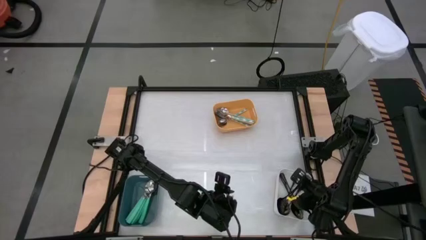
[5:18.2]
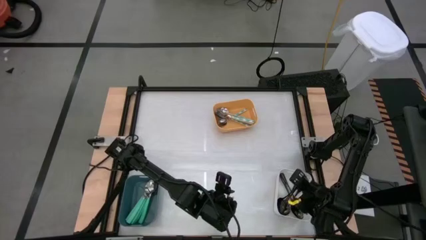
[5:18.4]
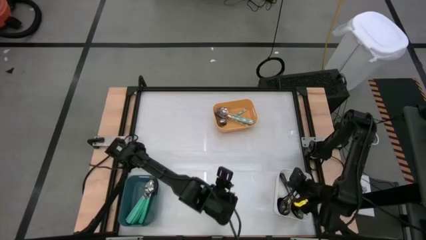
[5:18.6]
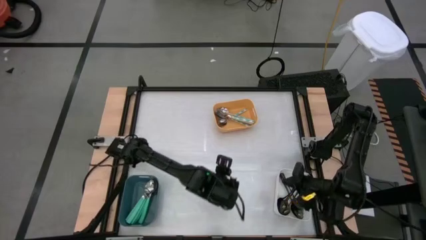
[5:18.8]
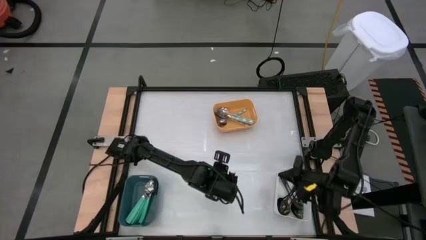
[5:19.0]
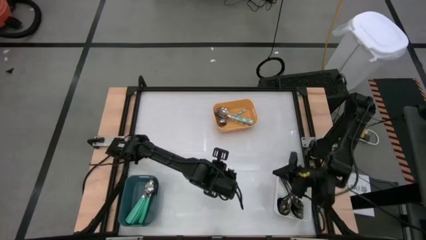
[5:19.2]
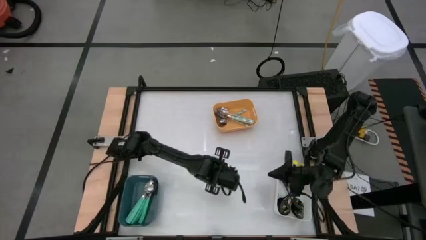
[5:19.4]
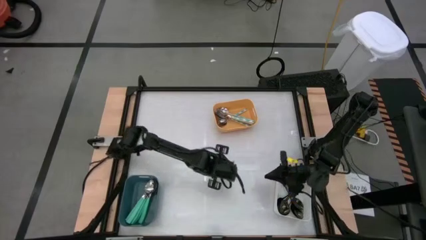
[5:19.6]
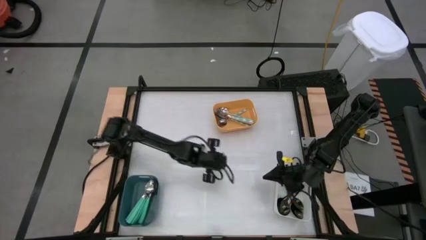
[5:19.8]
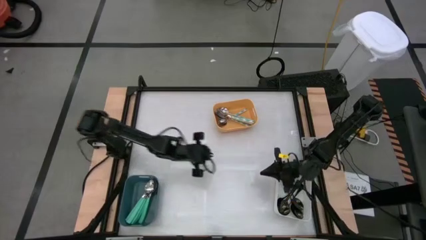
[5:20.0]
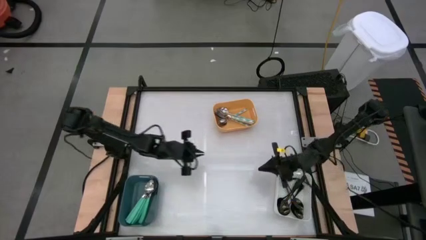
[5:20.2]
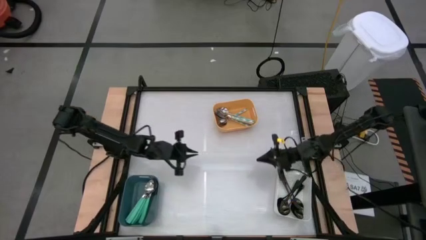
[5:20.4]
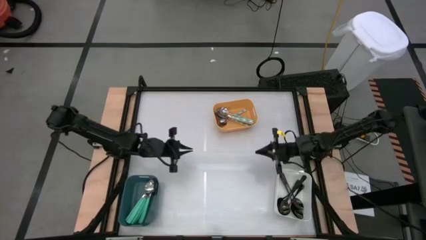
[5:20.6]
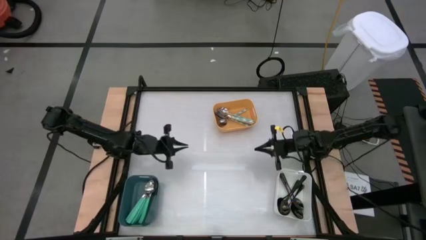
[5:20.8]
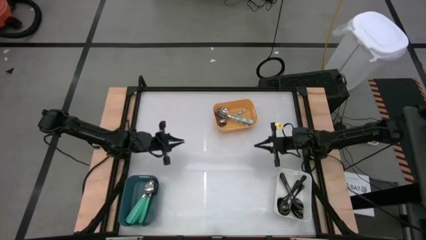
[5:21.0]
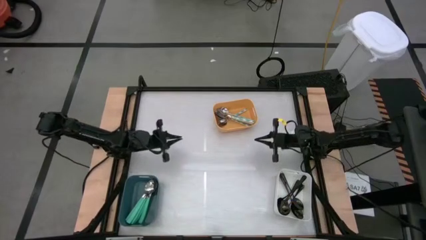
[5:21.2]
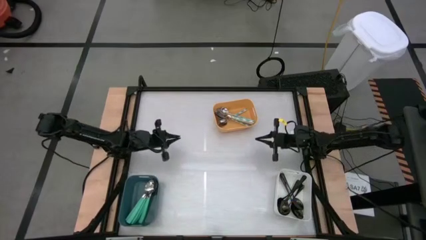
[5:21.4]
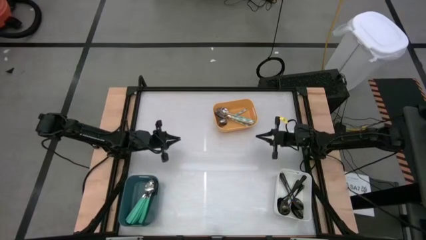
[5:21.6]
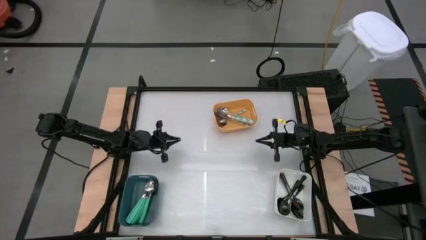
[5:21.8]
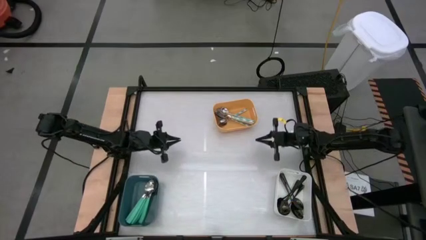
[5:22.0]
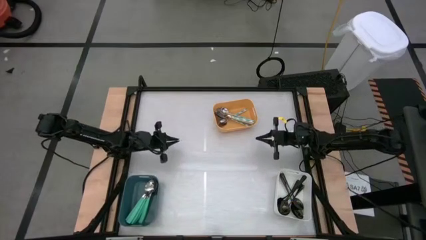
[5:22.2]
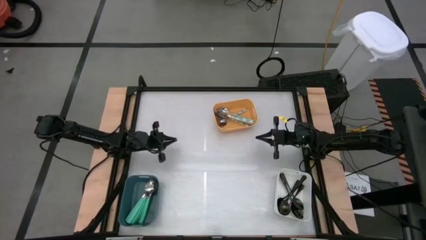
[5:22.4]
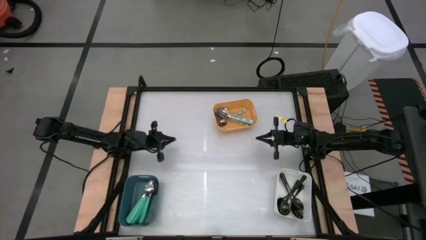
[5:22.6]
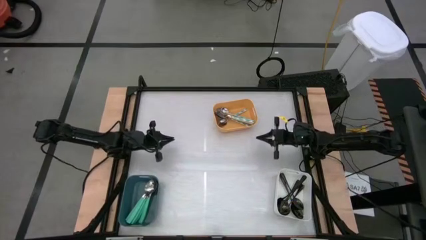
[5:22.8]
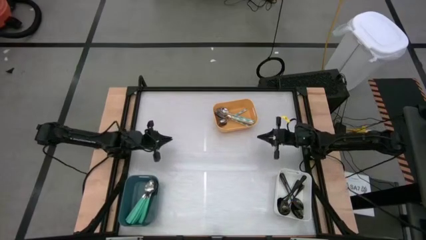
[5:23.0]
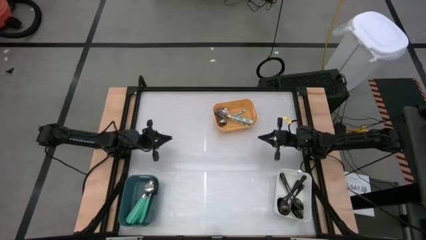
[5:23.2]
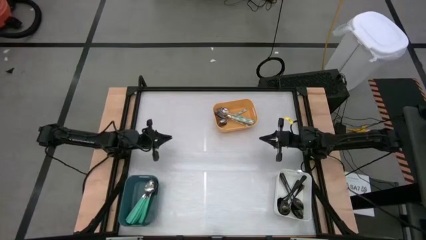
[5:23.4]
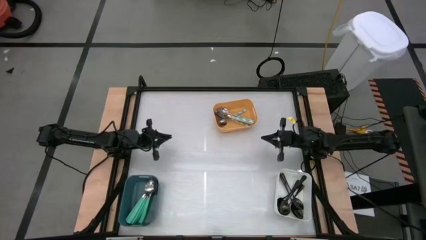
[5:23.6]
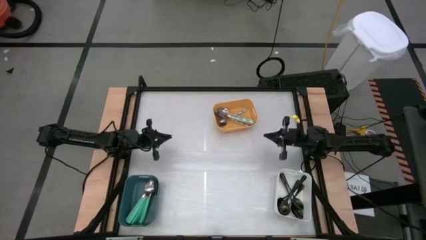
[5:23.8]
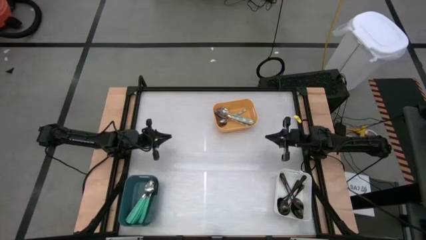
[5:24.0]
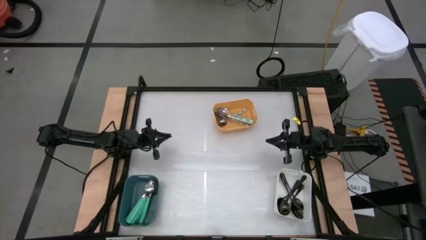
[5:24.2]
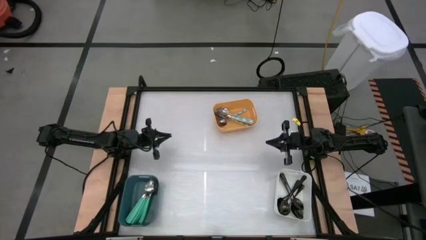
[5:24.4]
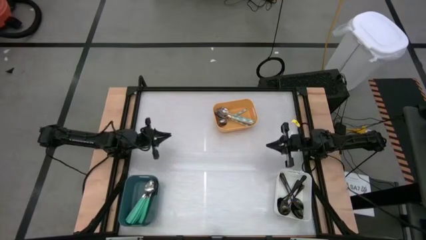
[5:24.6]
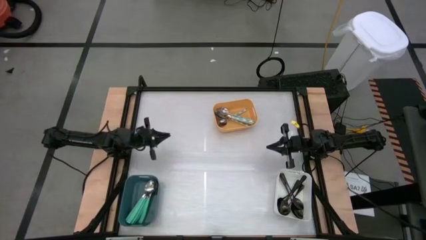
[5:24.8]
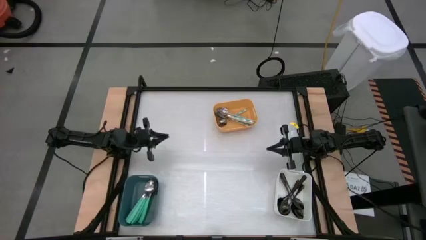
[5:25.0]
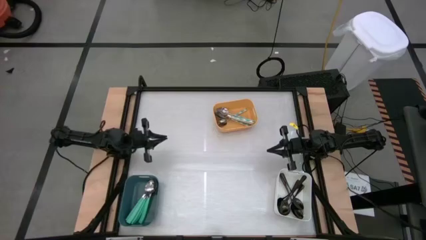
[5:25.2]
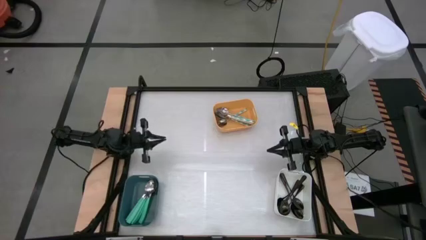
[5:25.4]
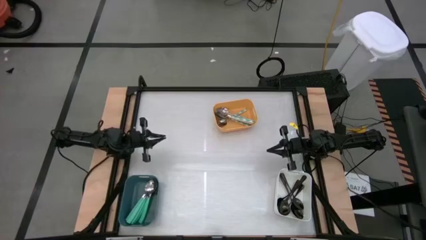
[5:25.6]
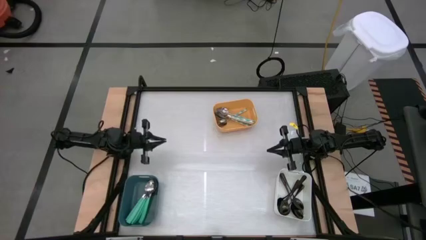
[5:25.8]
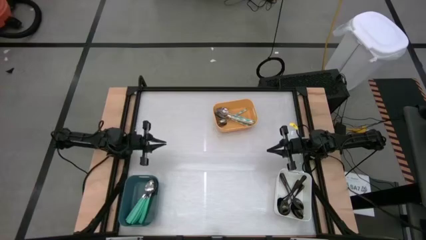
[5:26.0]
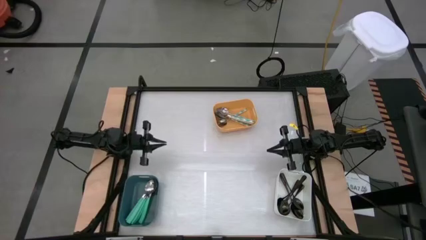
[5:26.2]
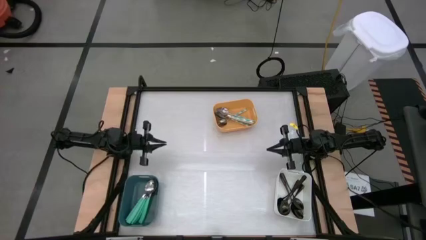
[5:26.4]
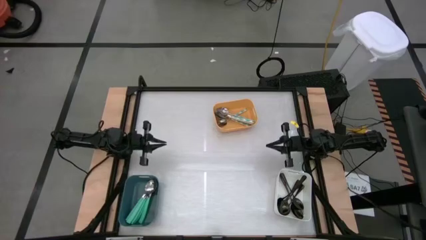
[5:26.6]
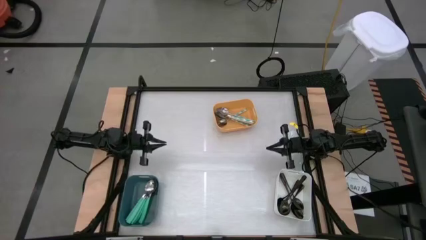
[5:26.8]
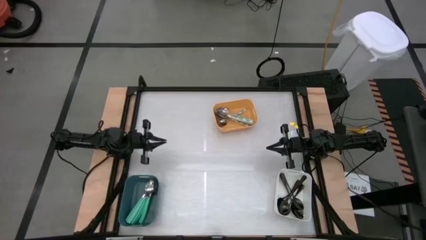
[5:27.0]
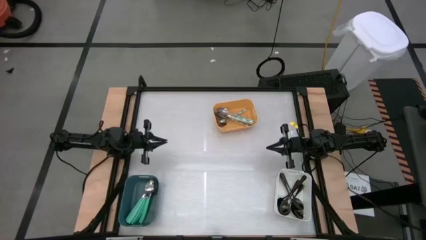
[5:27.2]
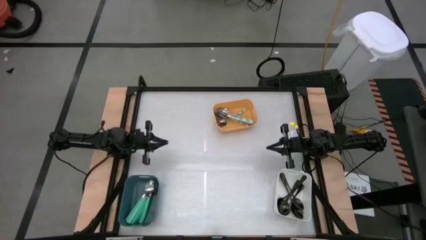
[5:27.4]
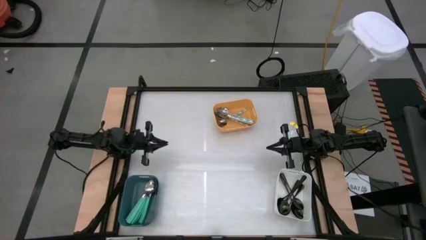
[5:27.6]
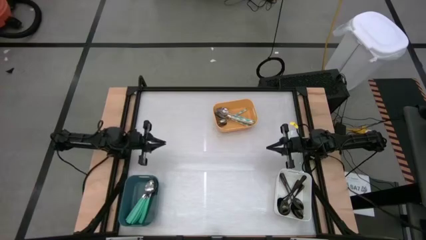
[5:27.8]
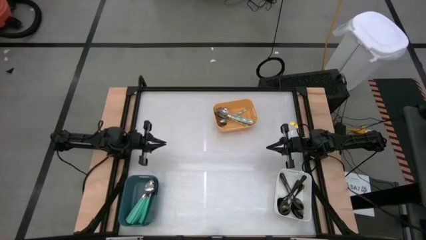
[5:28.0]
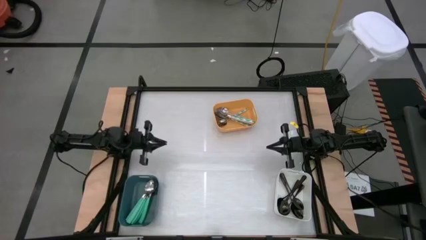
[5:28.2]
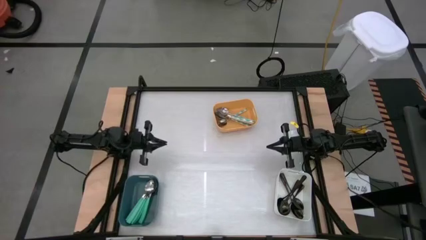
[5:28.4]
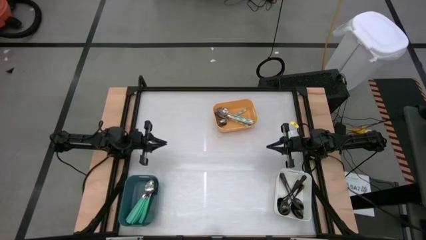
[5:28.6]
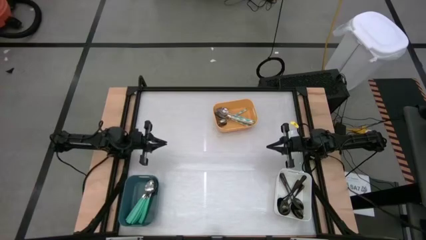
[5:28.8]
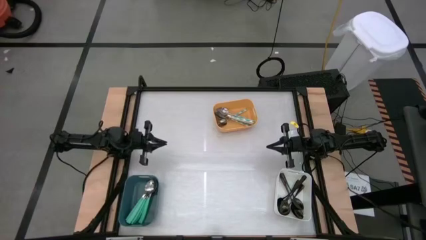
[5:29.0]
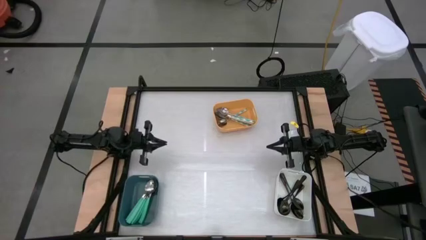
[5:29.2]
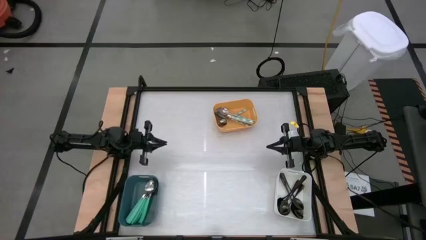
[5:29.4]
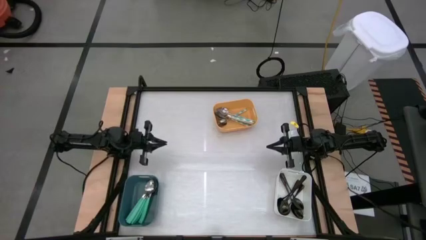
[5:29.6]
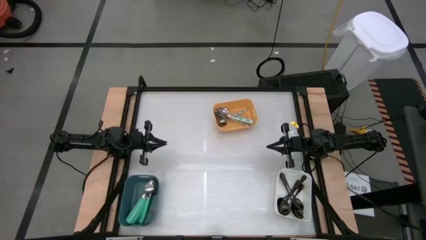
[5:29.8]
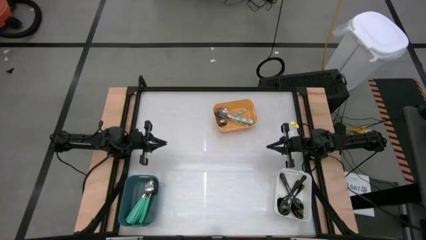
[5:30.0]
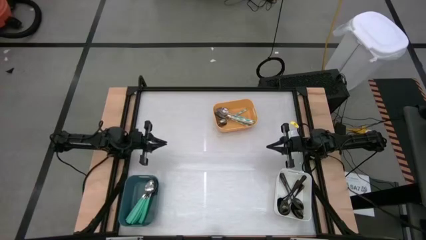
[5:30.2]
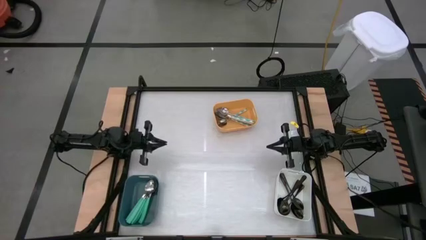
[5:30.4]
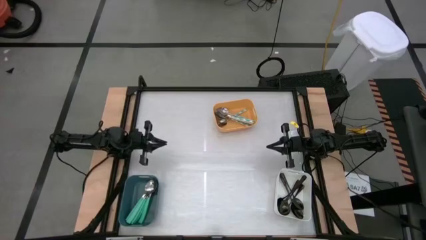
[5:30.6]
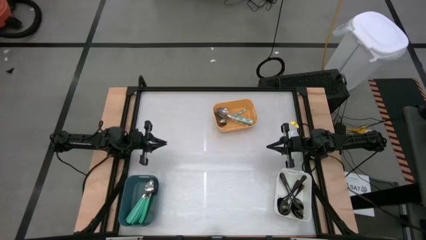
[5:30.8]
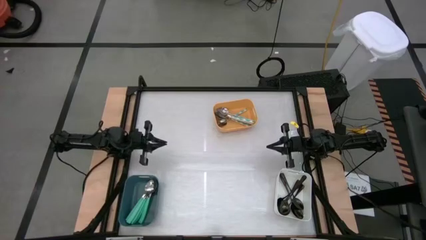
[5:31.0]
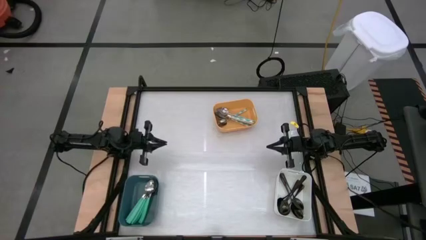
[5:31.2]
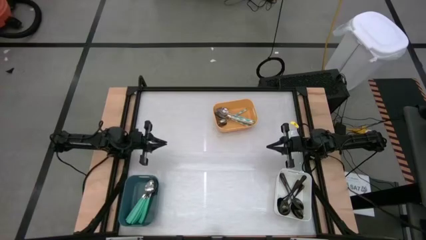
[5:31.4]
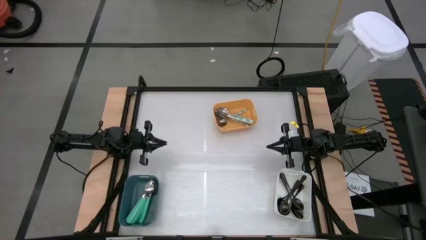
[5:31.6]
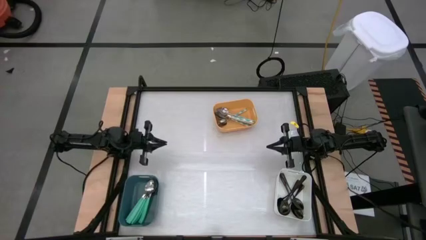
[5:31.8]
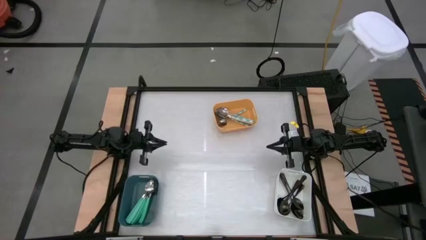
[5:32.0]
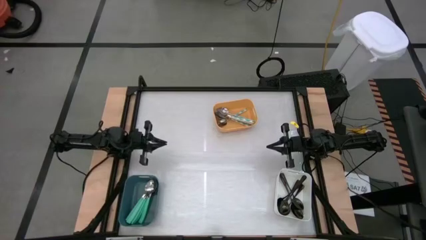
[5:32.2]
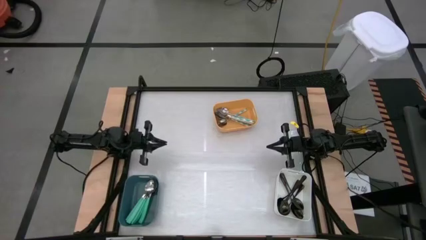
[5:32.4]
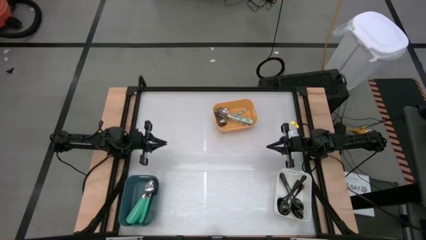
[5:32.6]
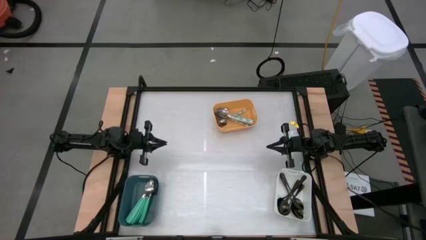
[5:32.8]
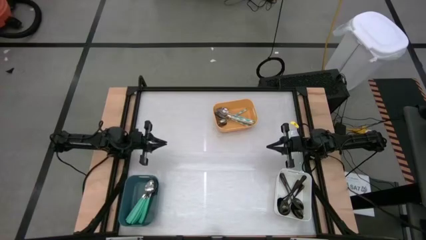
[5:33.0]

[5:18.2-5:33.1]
Task: Sort silverware by color (type)
Return to Home Position

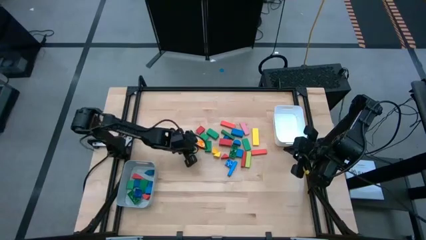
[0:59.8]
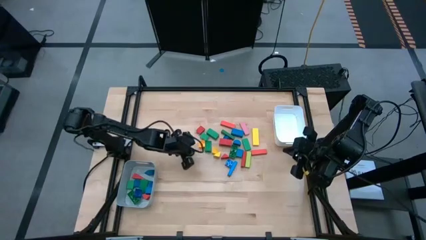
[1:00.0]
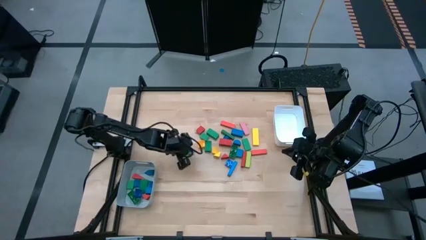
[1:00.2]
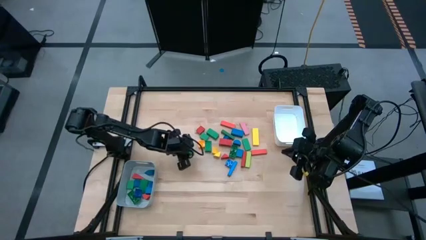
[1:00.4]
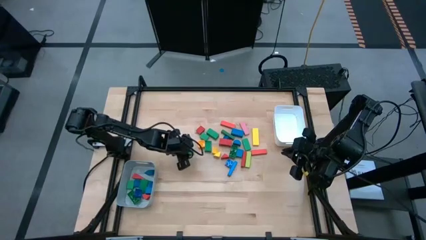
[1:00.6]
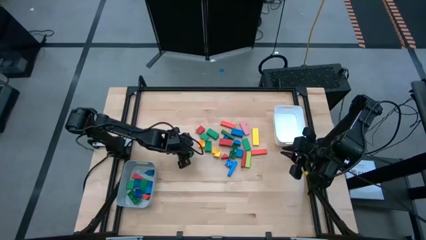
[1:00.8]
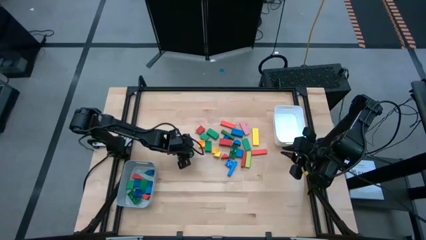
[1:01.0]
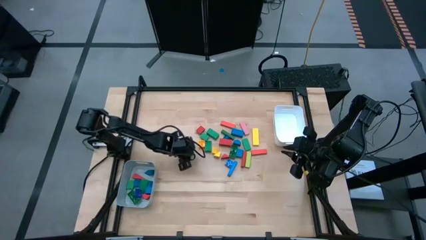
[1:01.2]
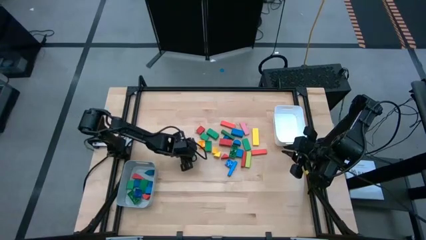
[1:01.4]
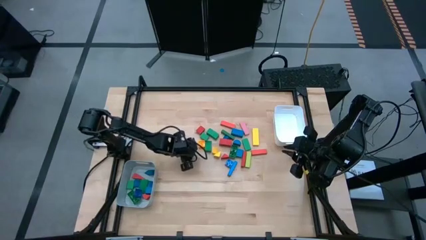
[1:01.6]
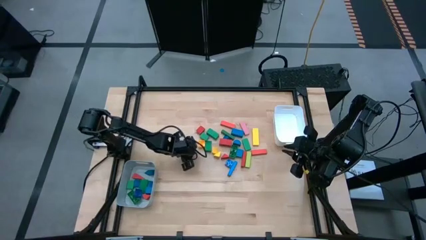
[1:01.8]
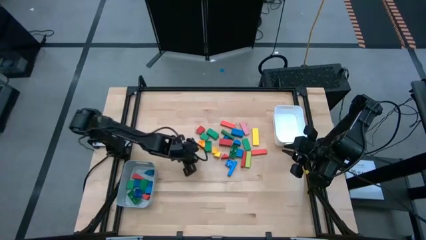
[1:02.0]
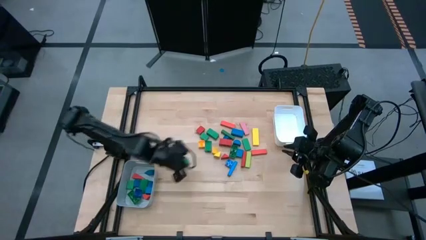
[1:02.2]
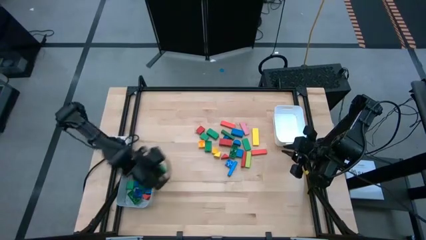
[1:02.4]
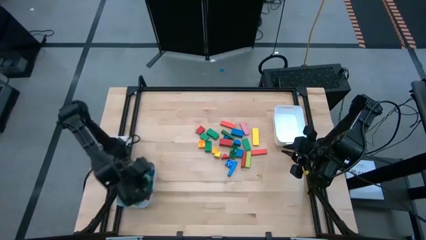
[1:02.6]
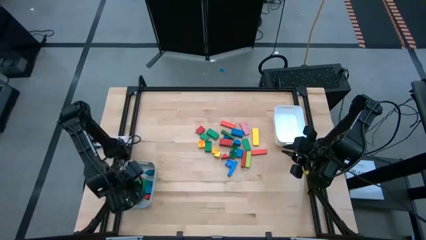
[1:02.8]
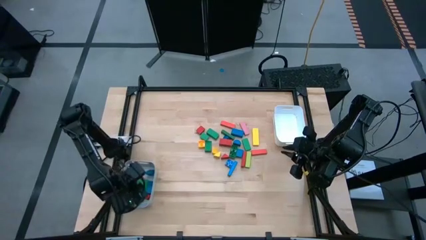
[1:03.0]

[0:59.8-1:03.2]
Task: Sort blocks by size
Put the green triangle block into the gray bin
